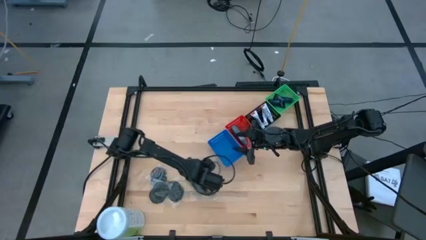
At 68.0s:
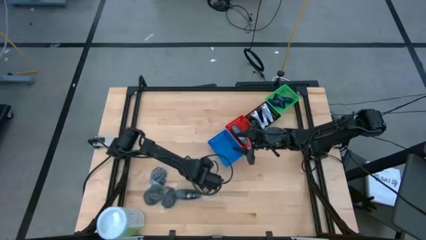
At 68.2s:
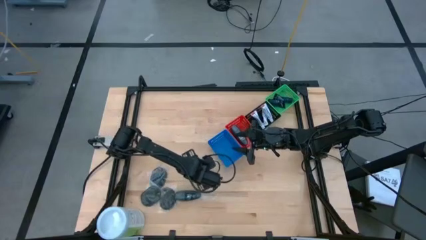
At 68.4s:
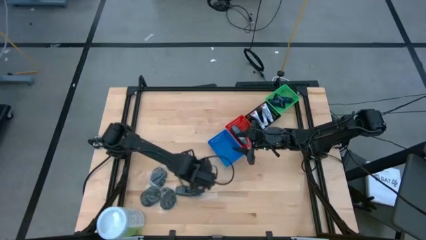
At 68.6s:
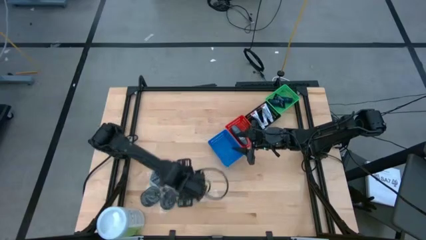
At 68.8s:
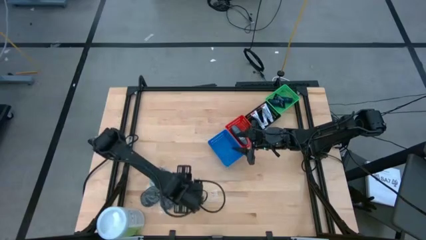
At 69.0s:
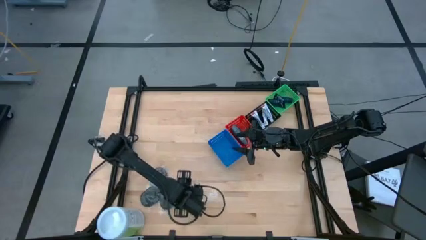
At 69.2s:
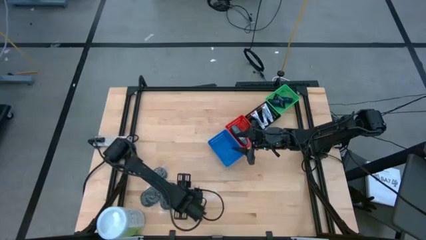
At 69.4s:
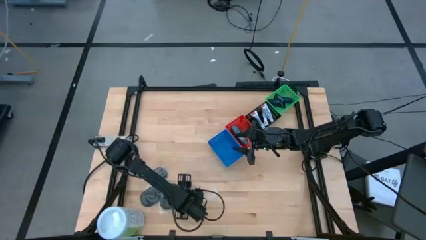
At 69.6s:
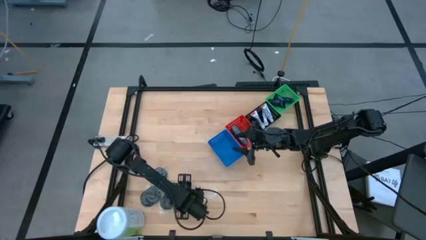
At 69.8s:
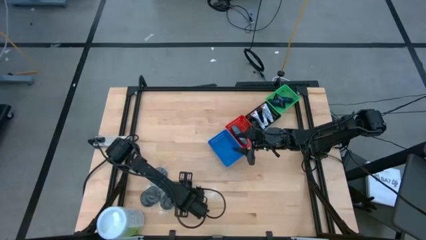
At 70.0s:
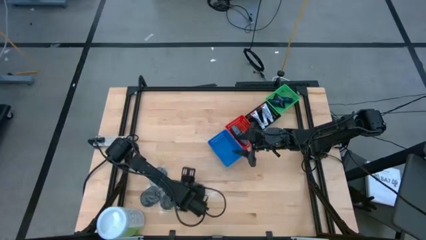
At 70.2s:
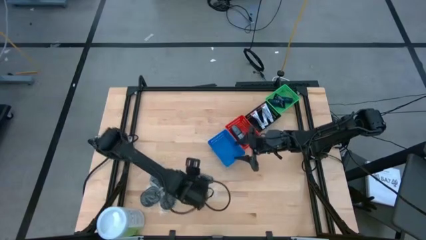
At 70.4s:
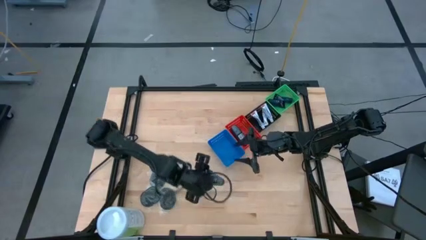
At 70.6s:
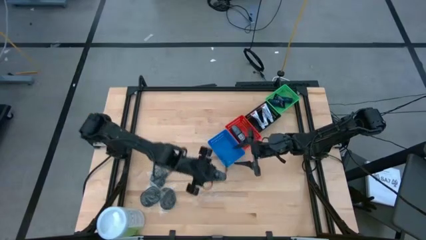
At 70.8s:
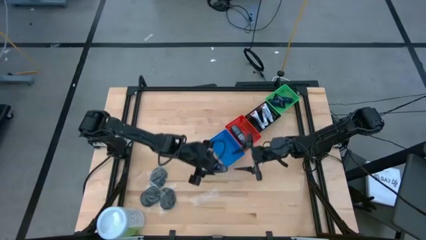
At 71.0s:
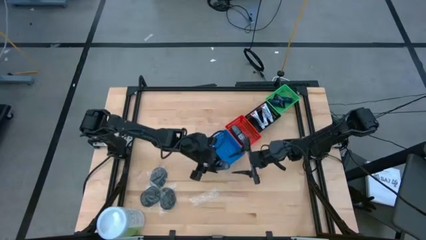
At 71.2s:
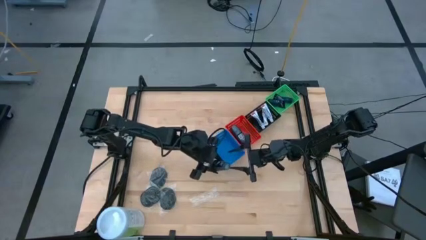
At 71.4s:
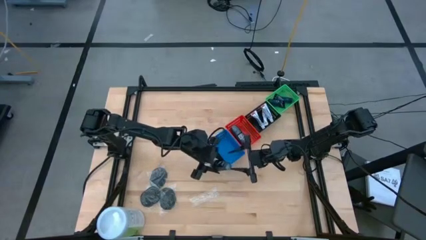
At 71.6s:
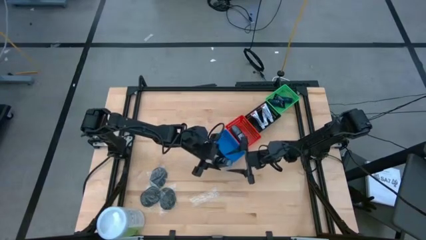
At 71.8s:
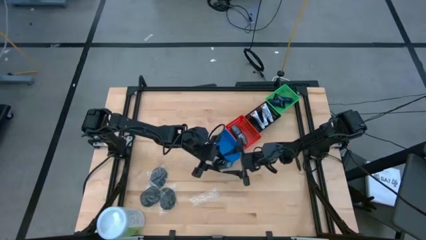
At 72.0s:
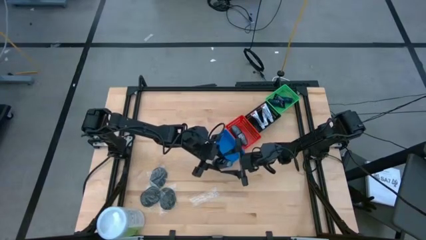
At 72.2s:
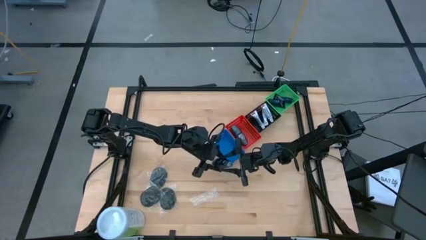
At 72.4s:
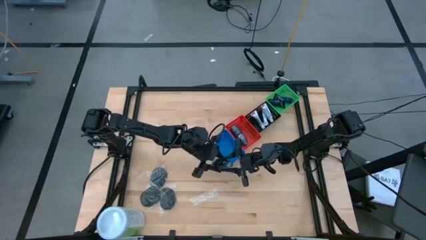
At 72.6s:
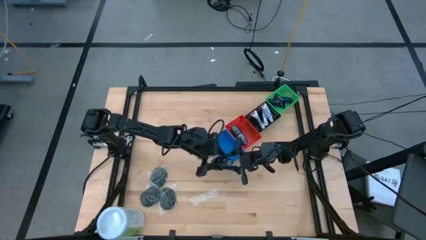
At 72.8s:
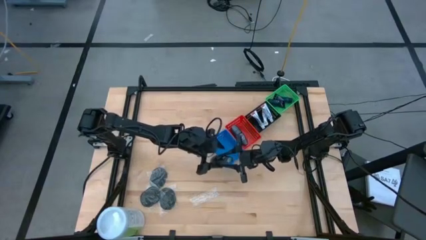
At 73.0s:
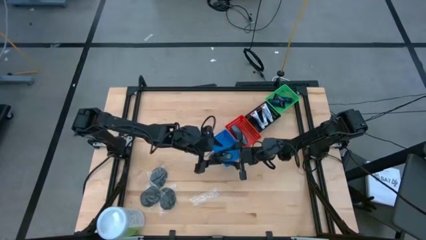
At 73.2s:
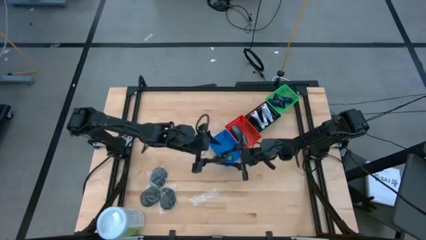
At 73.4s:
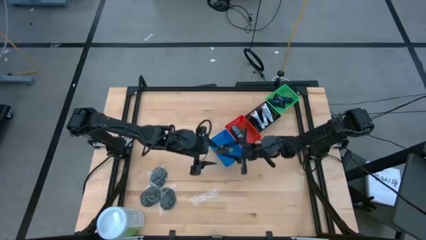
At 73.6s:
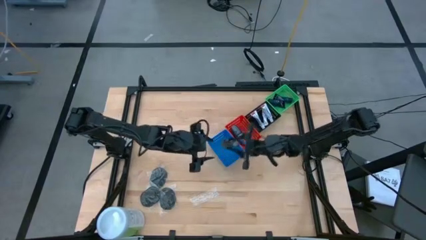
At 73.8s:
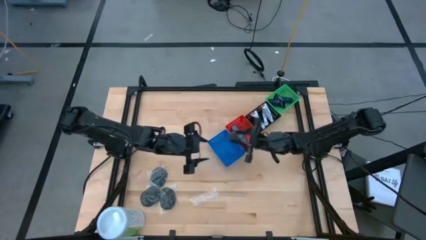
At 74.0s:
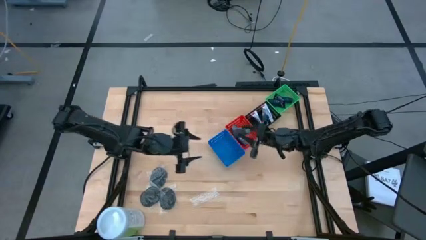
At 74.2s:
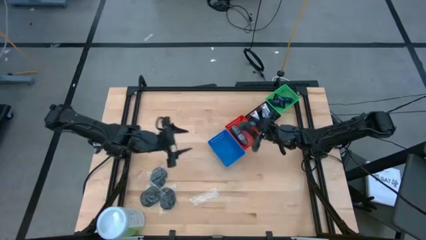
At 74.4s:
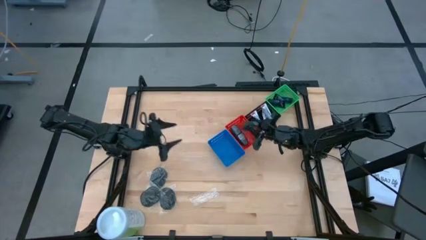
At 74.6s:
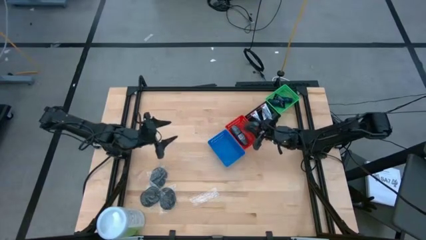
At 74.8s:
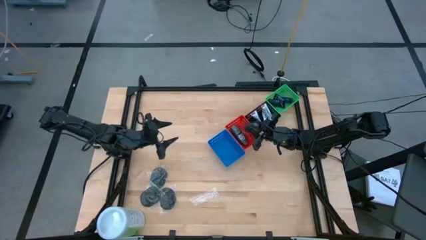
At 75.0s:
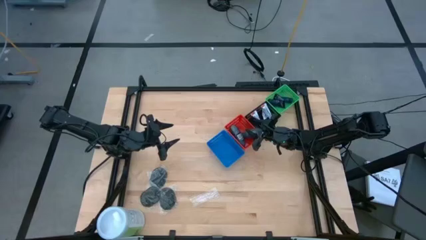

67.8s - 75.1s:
Task: Pick & Place Travel size toiletries
Put the deodorant into the red bin

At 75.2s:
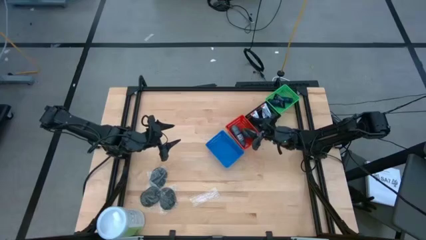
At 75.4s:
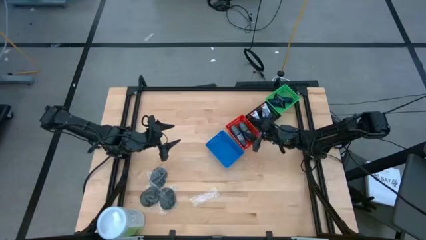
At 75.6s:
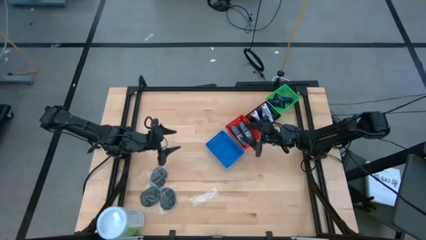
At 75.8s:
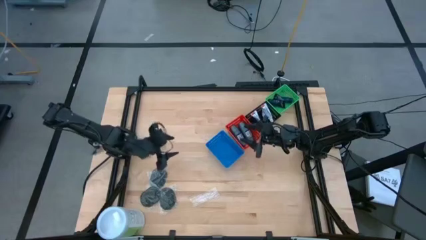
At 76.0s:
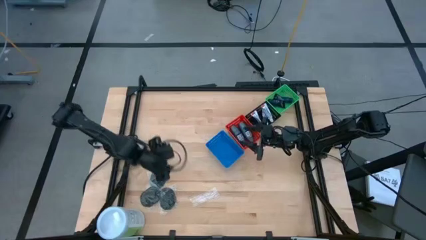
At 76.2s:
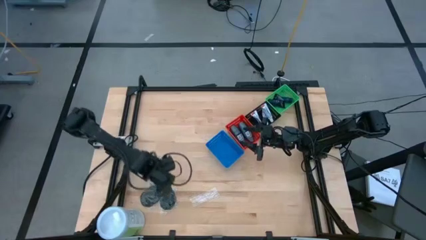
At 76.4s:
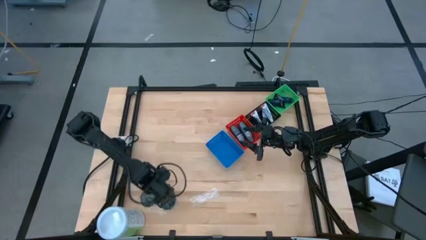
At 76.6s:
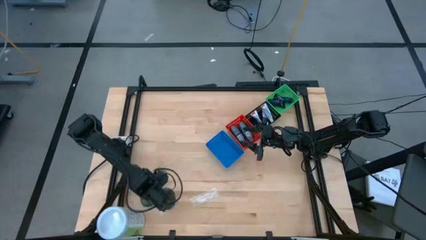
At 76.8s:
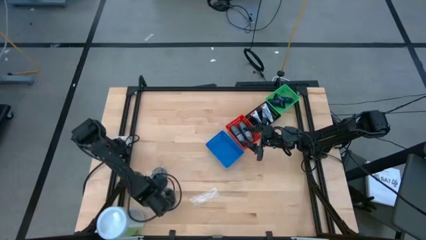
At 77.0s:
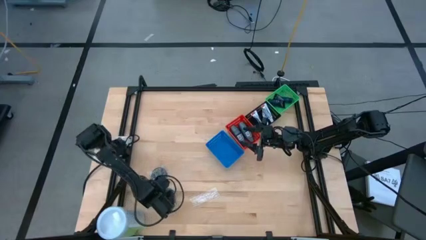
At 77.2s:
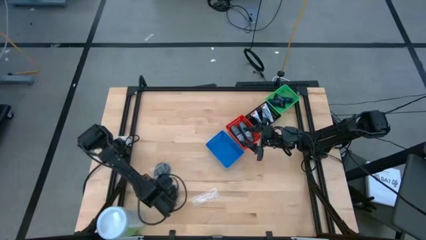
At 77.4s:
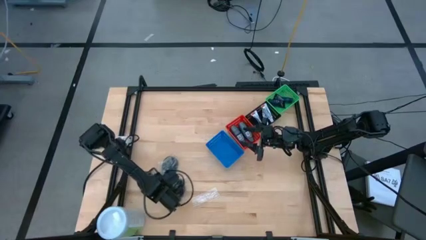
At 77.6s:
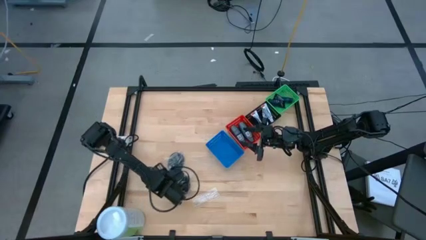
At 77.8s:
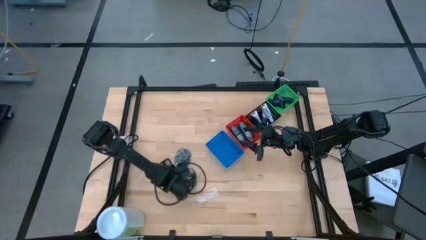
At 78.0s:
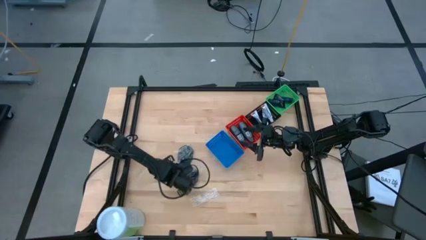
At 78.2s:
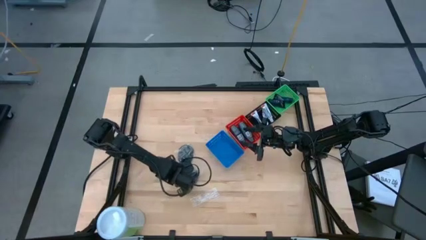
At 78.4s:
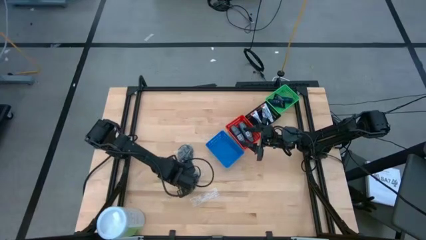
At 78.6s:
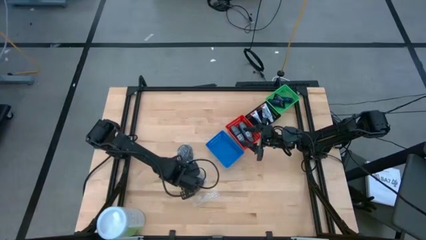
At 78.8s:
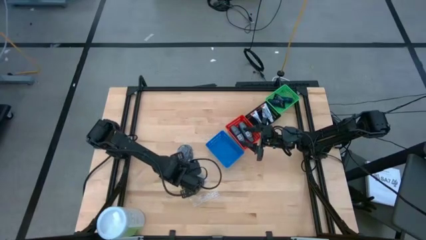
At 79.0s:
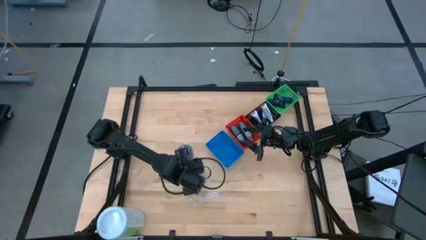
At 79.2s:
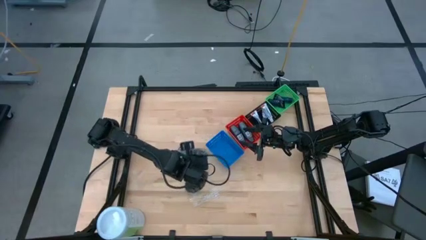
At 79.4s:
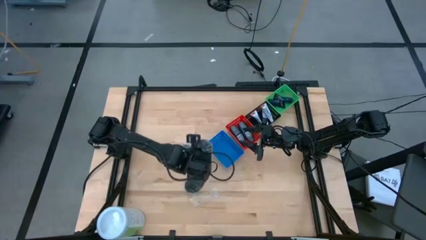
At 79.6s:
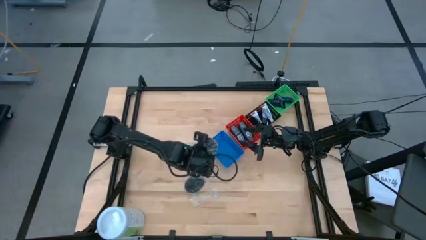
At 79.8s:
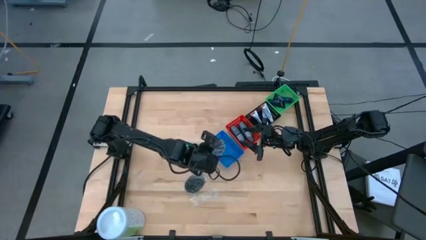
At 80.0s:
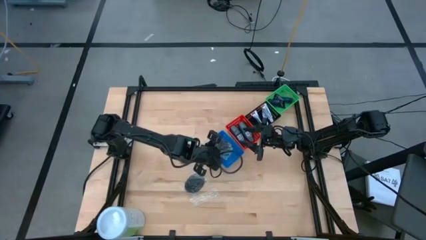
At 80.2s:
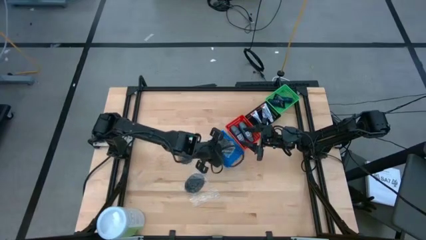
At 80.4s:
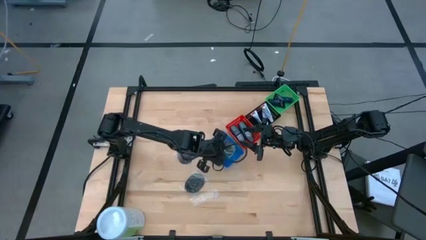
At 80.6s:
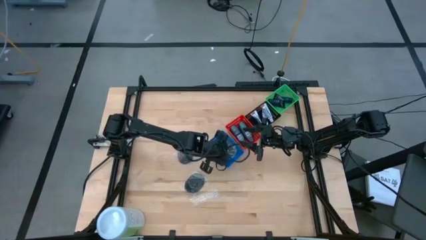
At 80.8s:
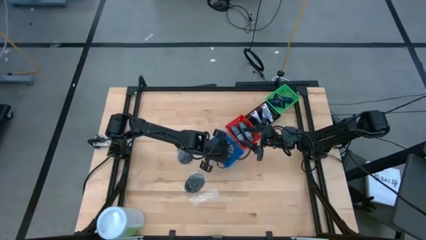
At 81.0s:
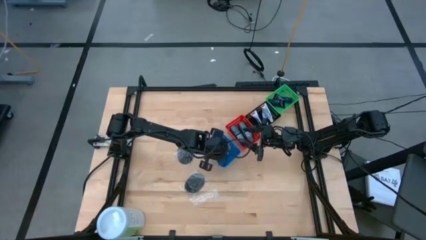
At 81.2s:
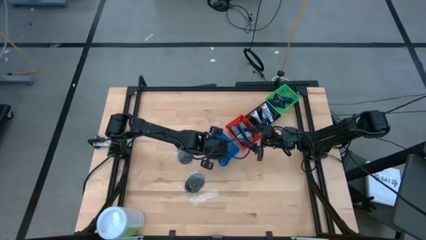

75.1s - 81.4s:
Put the bottom left hairbrush into the blue bin

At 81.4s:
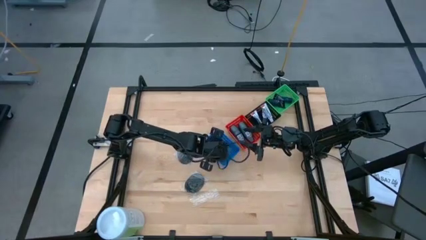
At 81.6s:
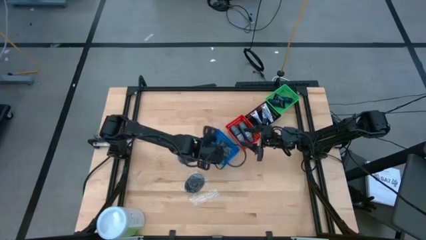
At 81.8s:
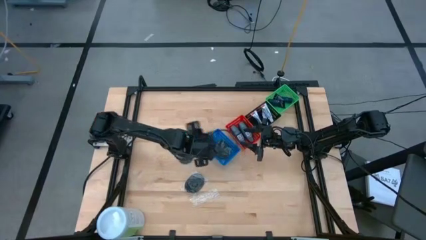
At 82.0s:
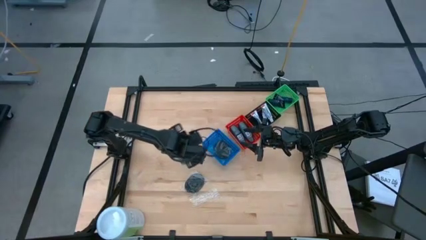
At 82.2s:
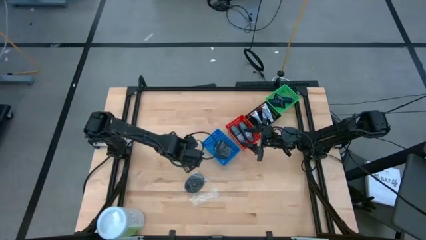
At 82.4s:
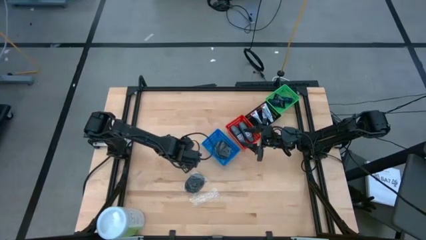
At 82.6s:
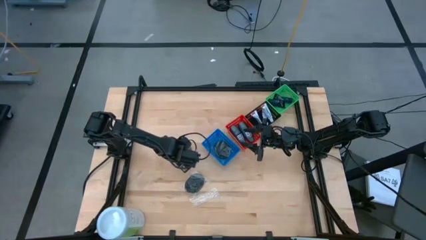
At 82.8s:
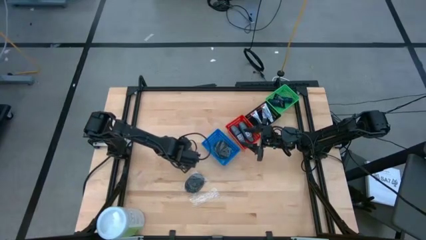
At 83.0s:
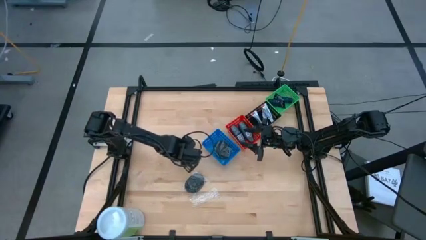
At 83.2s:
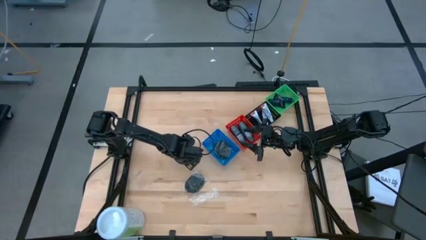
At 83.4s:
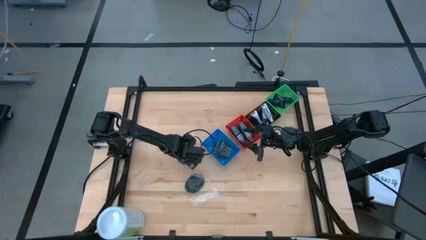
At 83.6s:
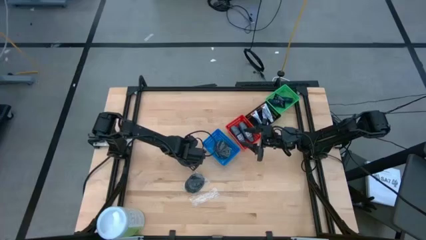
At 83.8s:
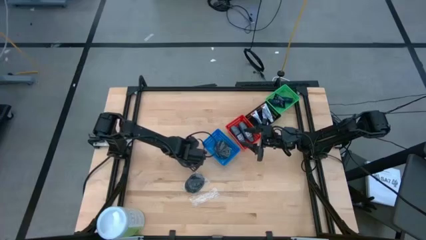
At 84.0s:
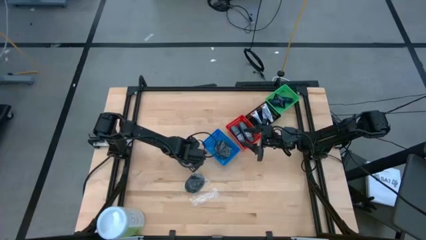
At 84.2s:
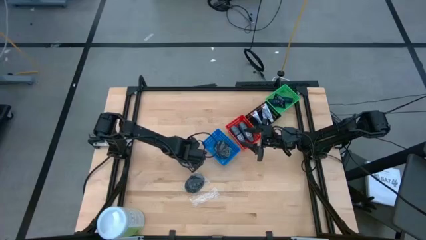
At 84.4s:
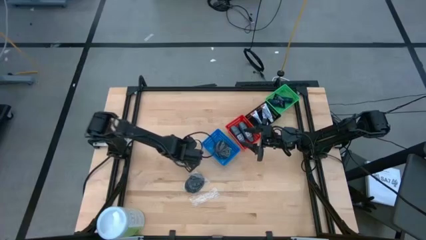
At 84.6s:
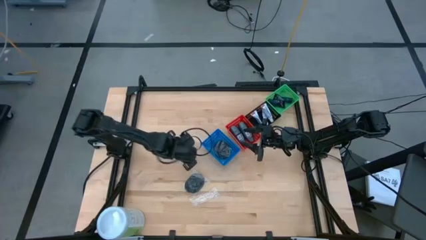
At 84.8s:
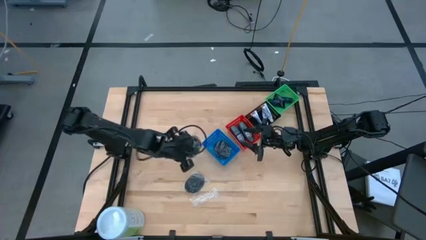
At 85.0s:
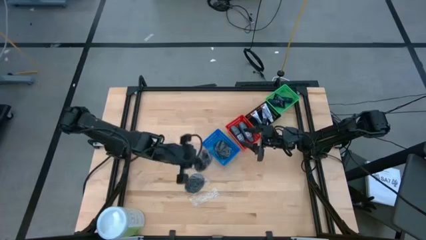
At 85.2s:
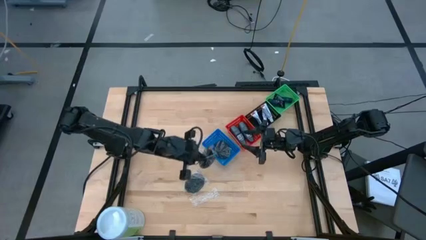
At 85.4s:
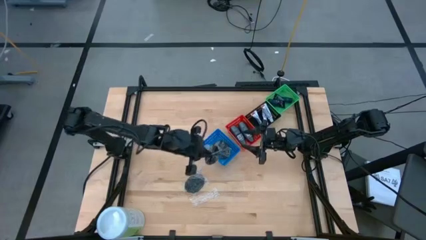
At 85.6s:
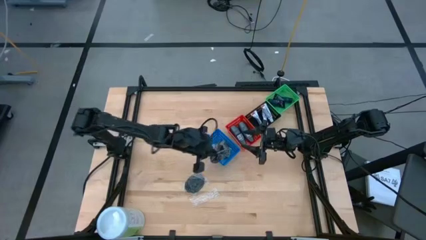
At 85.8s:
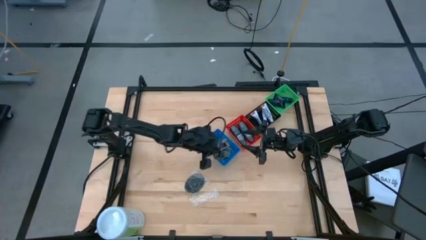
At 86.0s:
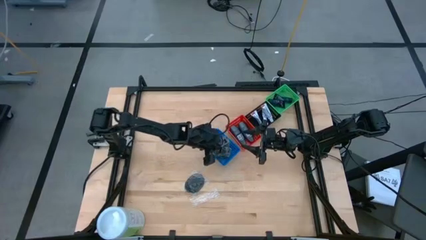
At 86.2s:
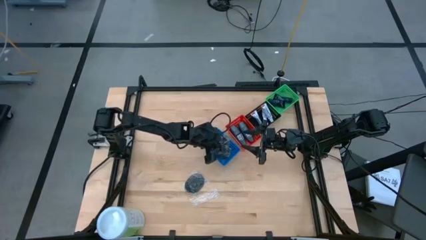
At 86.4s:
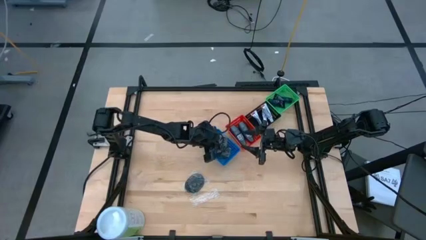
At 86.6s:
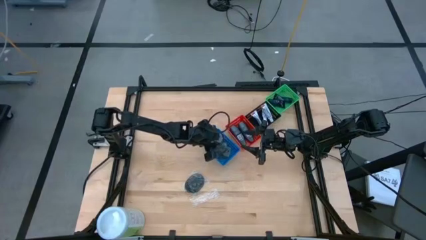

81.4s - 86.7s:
Put the top hairbrush into the blue bin
